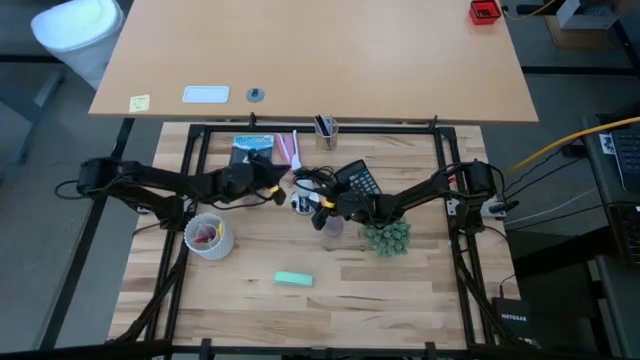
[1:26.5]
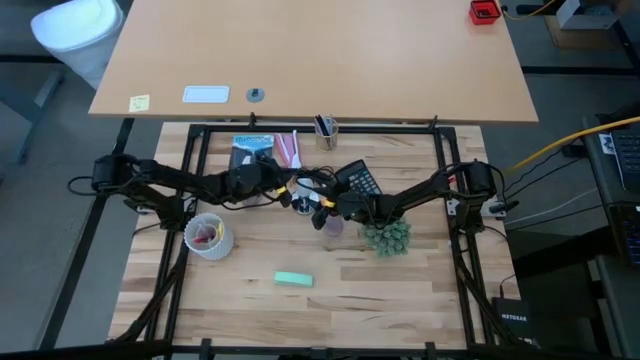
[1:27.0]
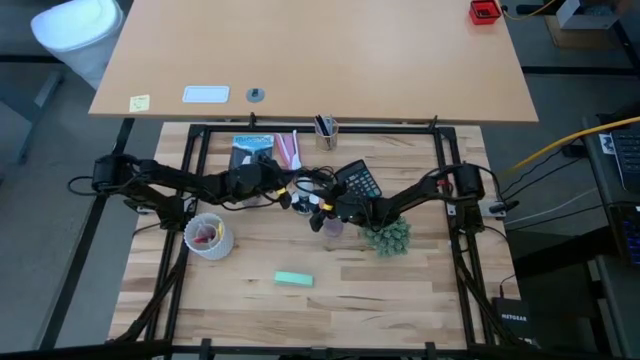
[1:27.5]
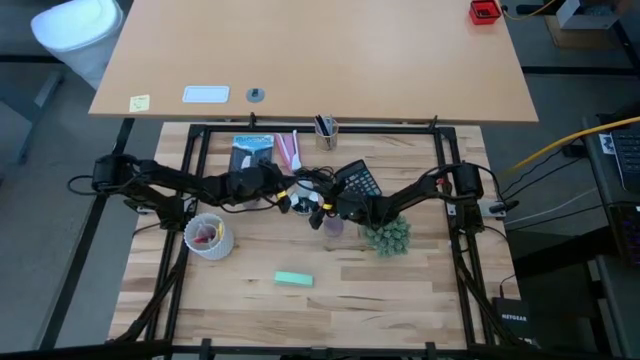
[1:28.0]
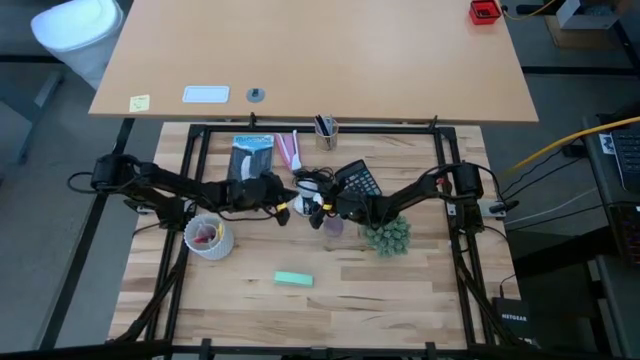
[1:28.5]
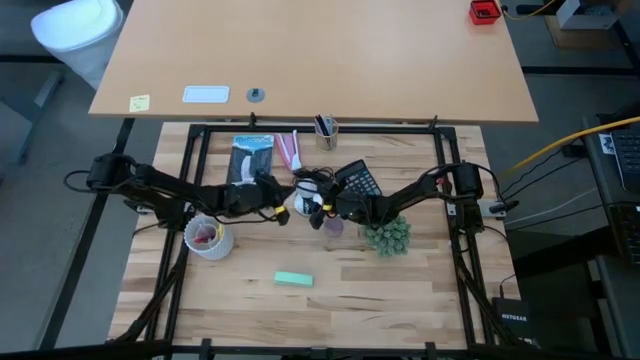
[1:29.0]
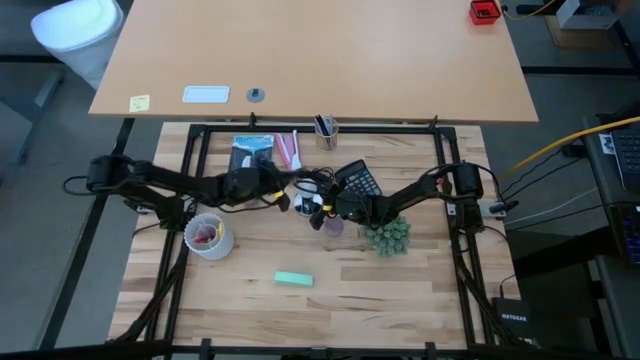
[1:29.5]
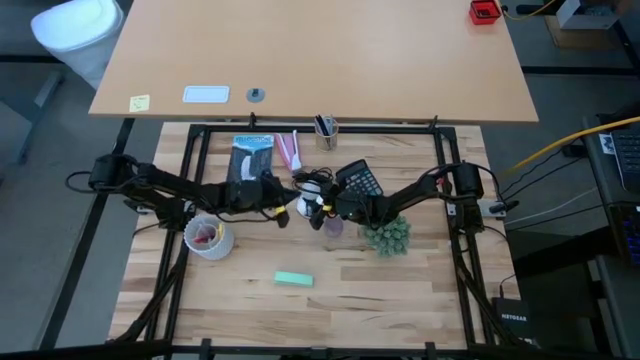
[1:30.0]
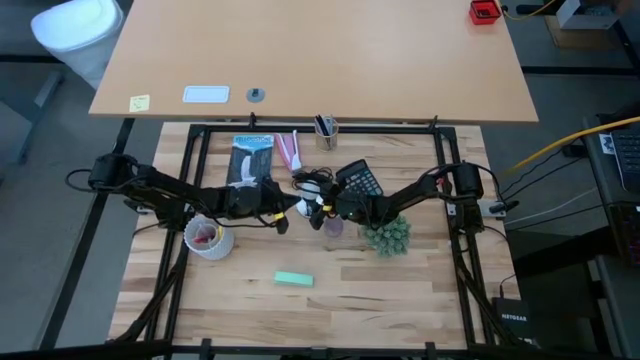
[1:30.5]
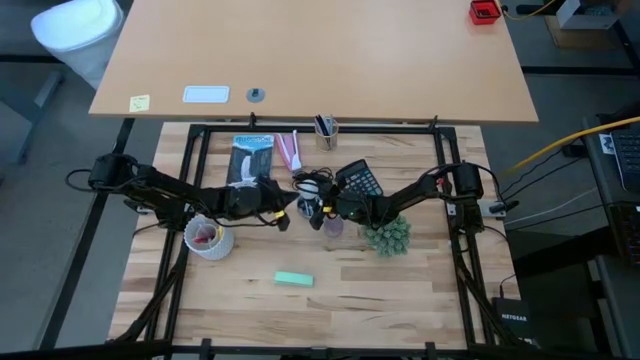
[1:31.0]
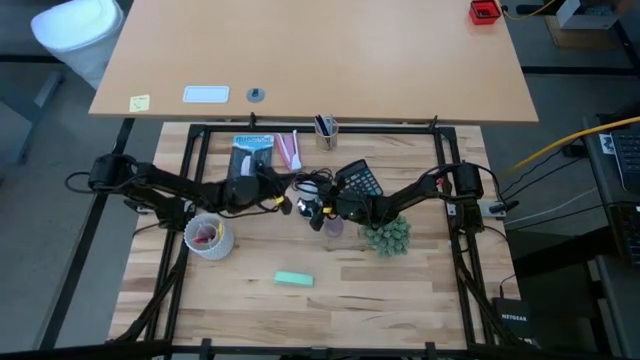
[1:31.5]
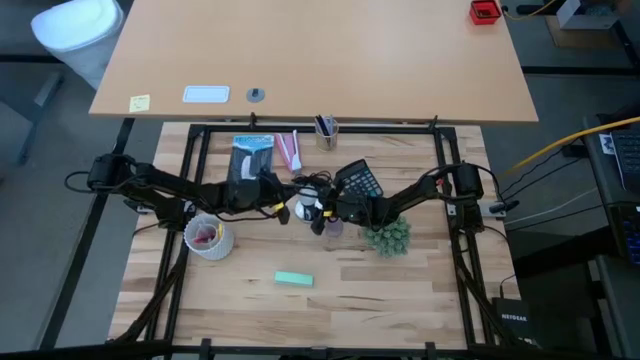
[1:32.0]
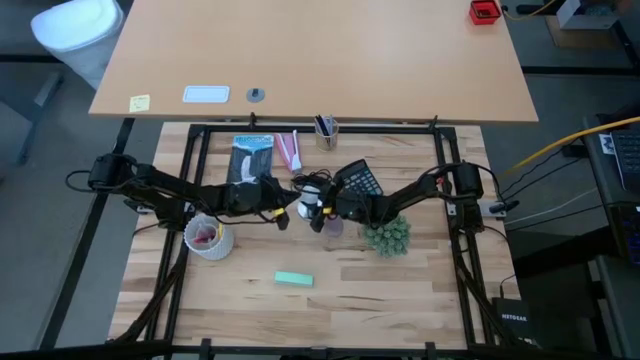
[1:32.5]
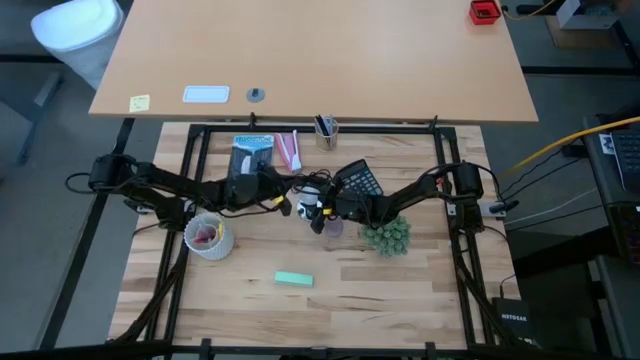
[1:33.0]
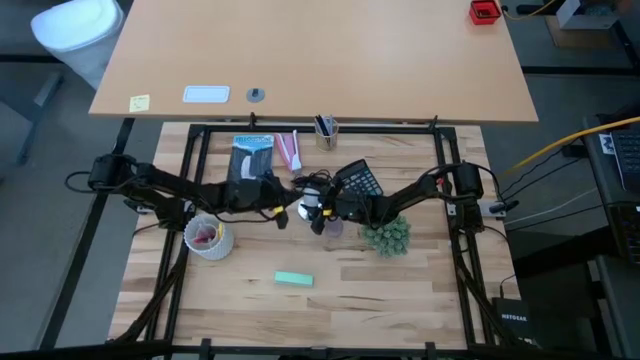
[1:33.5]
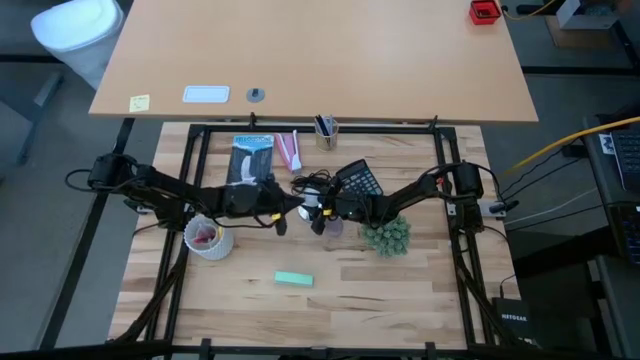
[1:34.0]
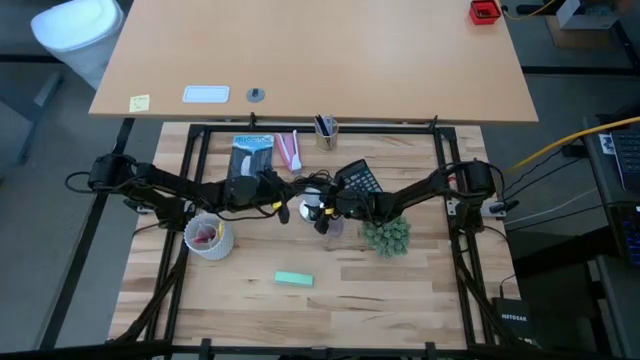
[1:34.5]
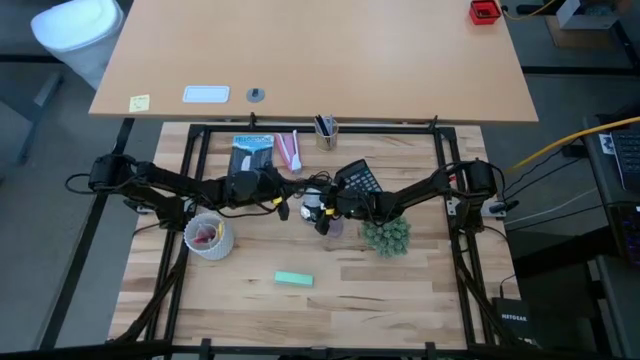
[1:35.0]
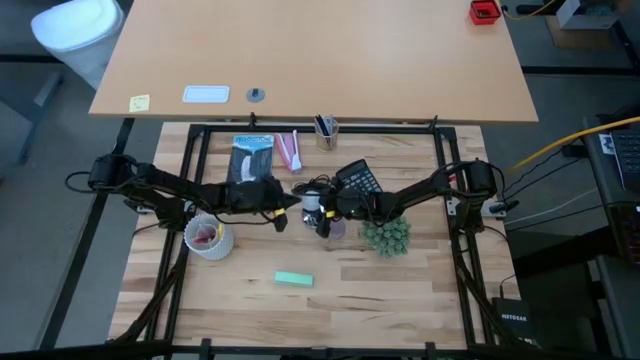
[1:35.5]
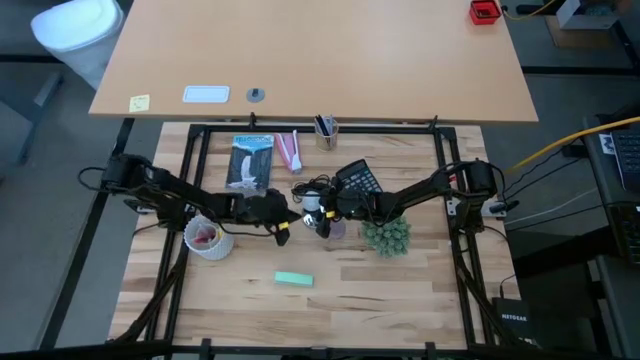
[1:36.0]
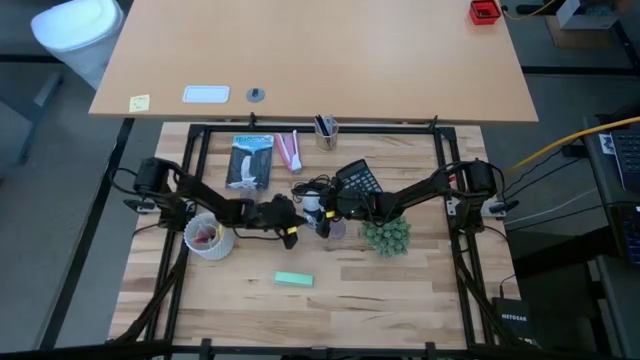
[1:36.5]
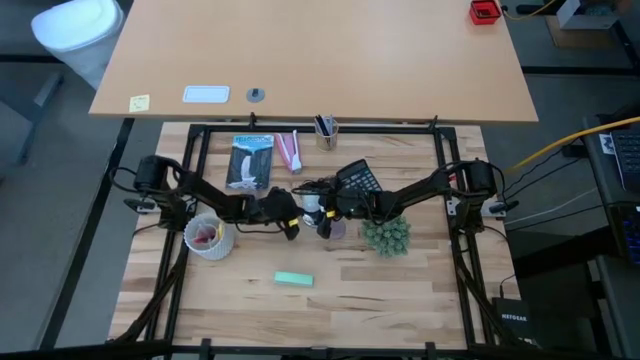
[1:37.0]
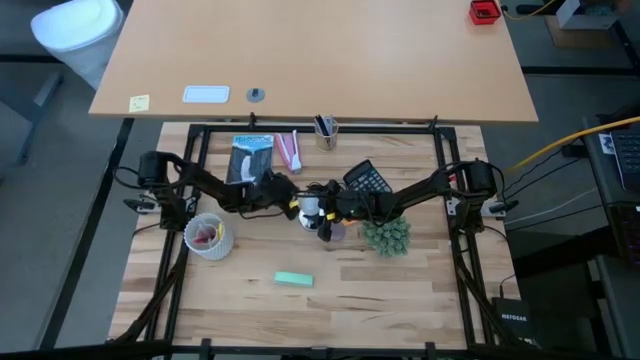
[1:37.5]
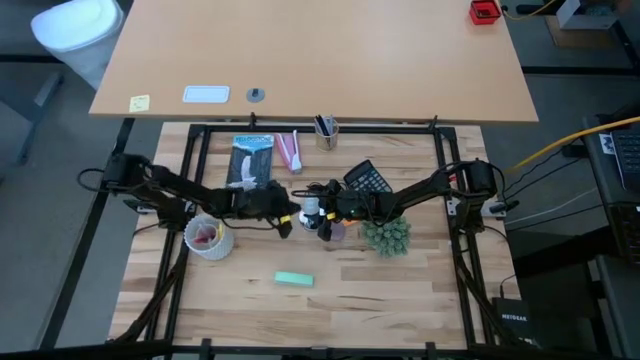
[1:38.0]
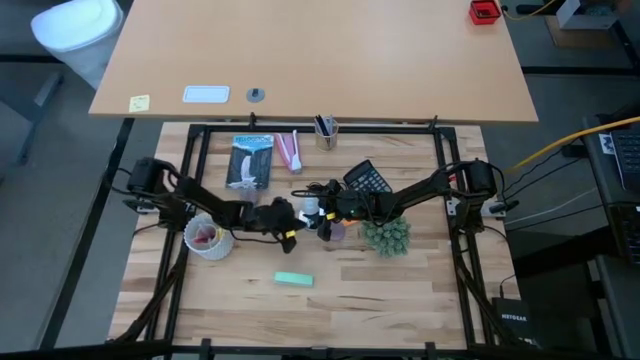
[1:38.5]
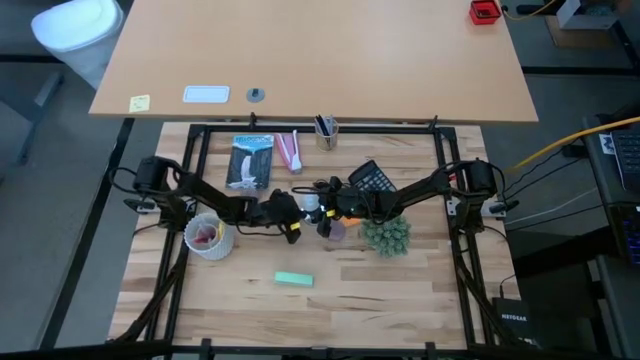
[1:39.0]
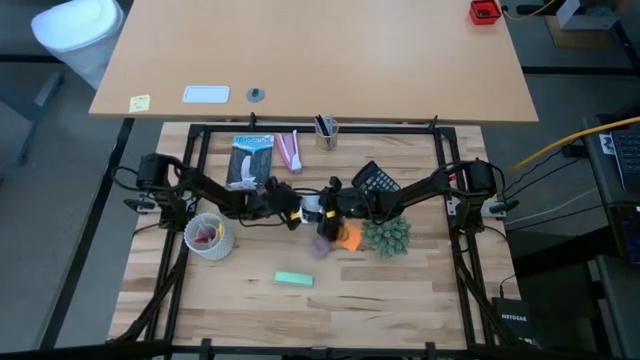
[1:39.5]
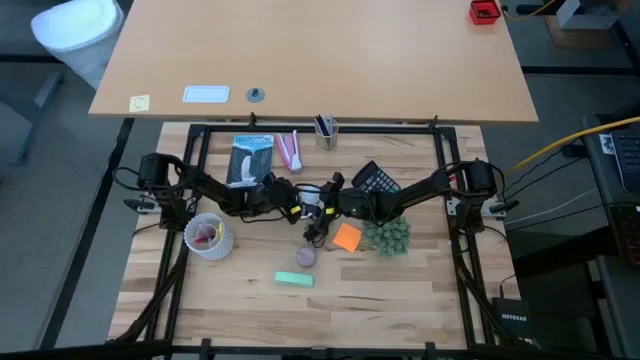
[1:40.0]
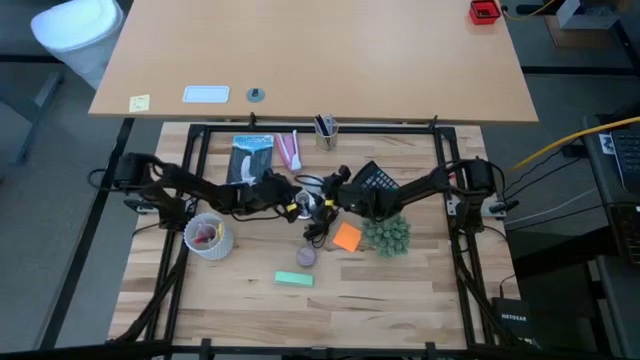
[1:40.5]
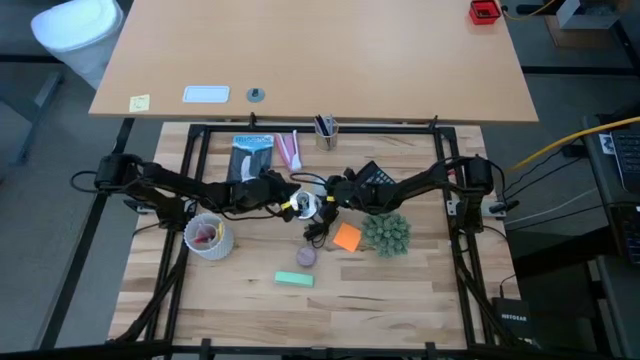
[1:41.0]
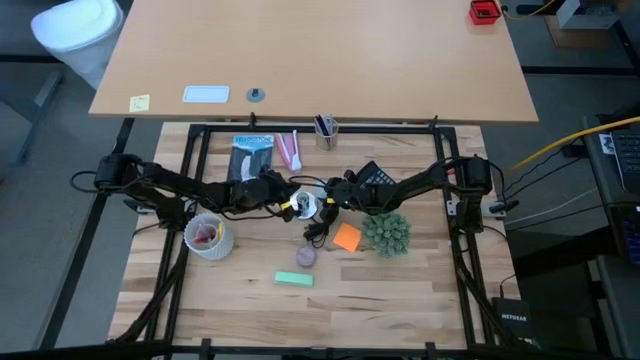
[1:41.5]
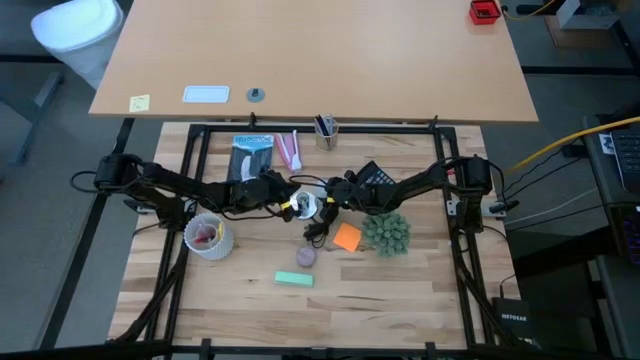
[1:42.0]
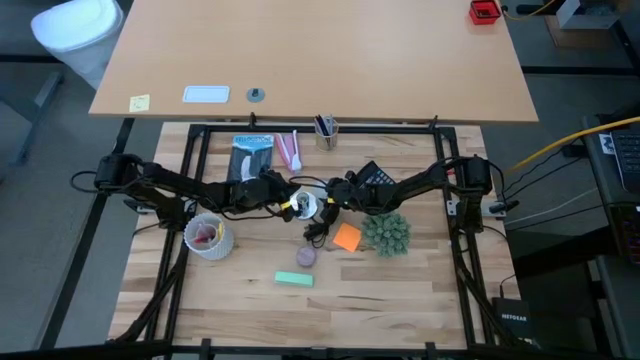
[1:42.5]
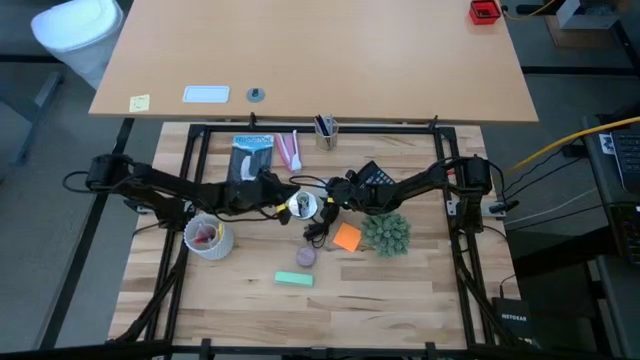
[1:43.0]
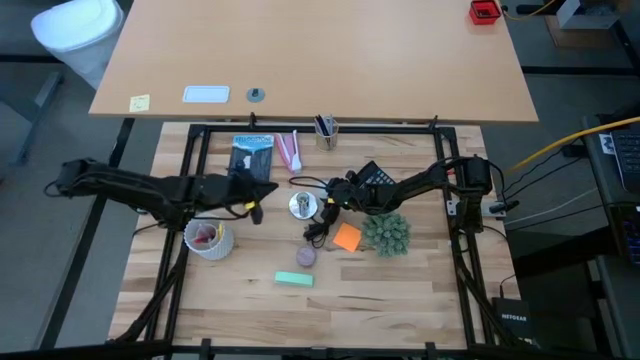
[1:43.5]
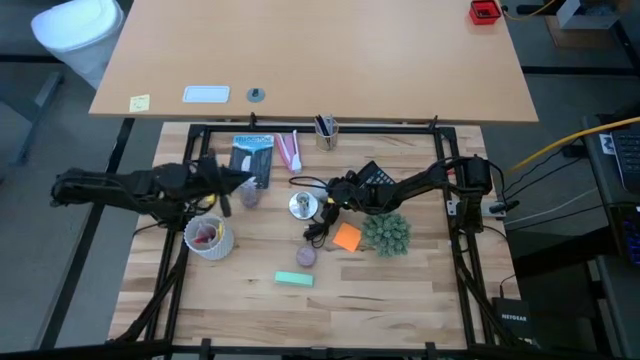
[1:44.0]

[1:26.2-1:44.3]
Task: Screw lightbulb
Remove the lightbulb from the lamp

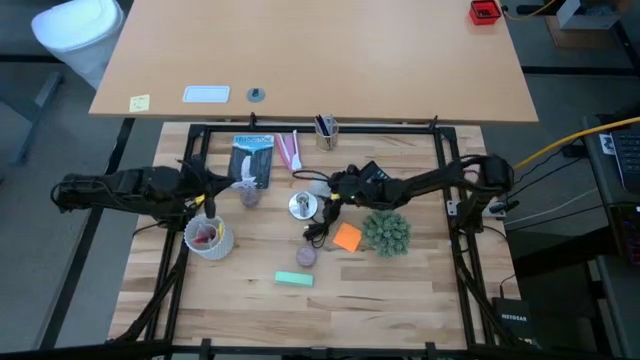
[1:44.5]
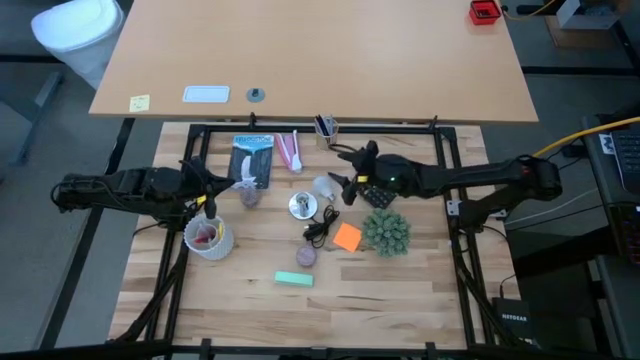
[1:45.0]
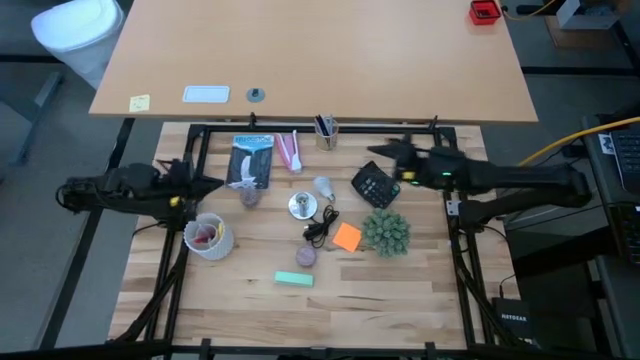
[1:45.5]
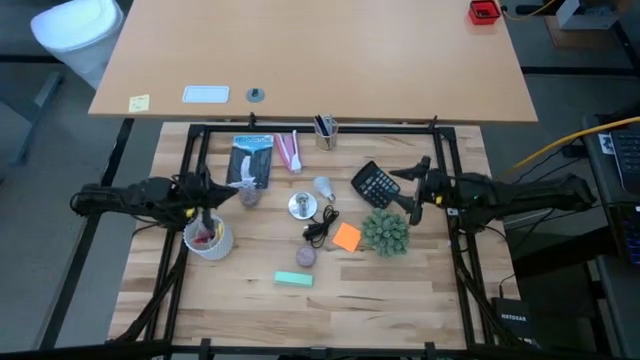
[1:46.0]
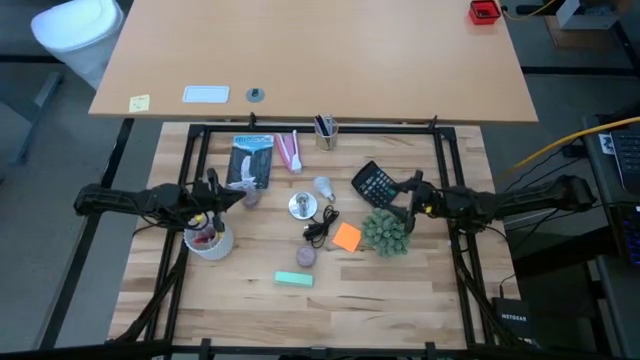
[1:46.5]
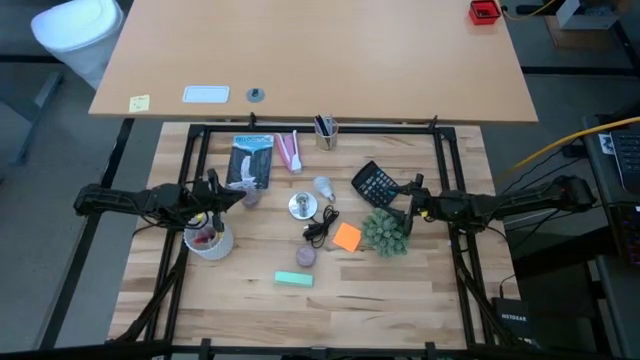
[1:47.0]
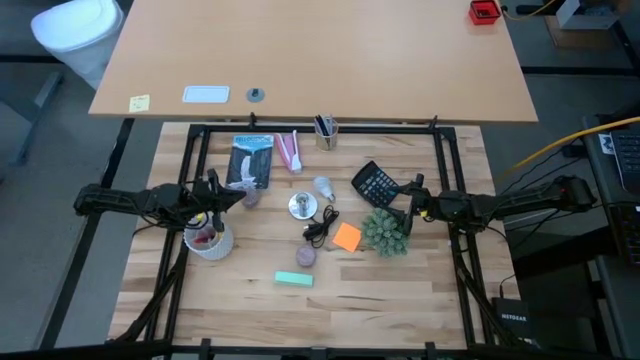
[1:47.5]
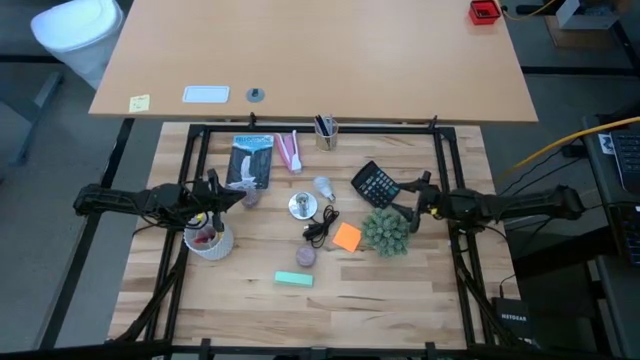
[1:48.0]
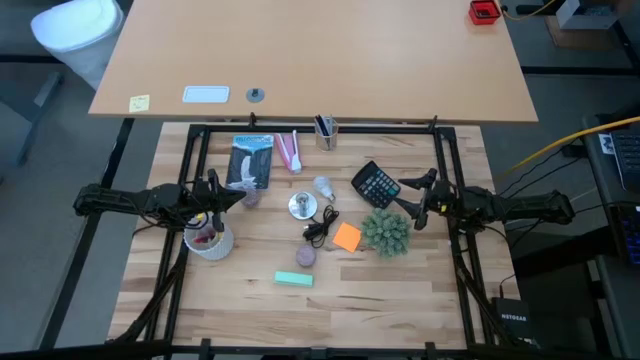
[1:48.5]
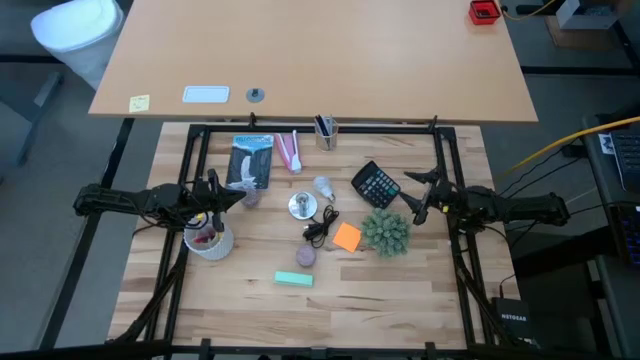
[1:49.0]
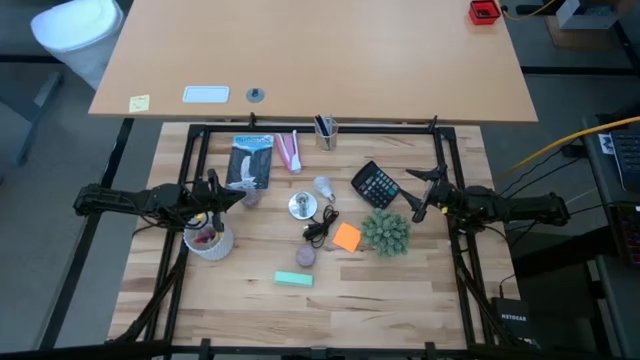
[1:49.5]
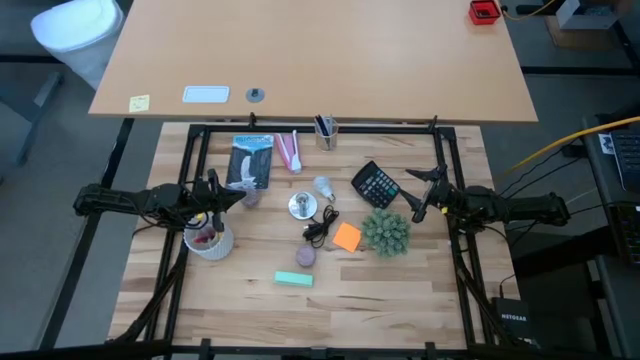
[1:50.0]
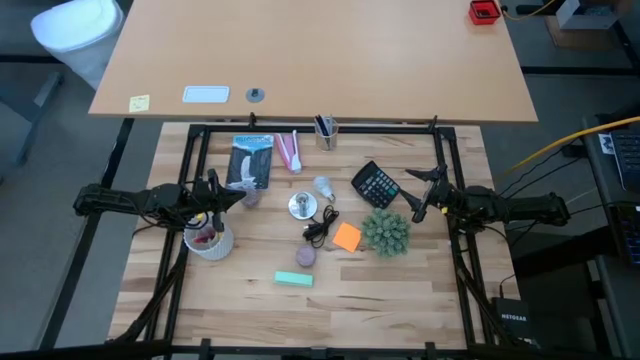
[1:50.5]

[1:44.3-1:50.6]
Return to Home Position
